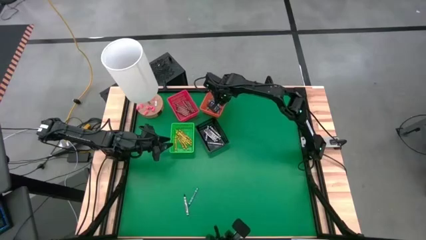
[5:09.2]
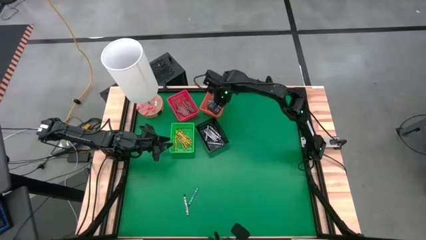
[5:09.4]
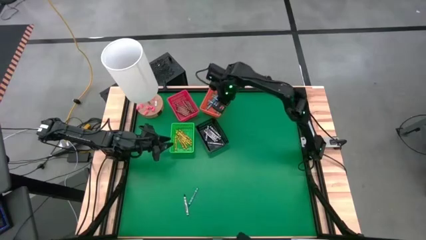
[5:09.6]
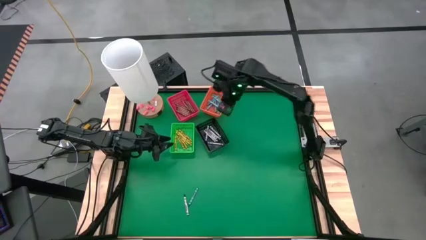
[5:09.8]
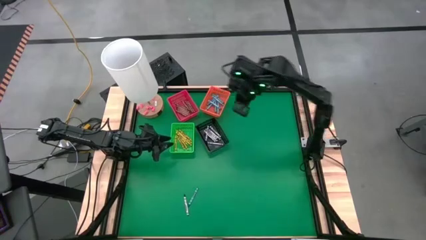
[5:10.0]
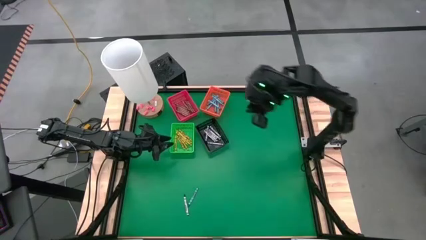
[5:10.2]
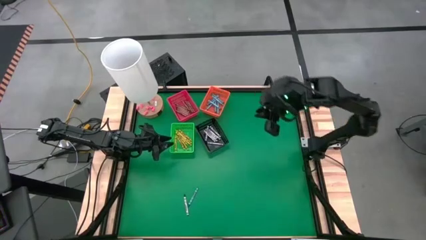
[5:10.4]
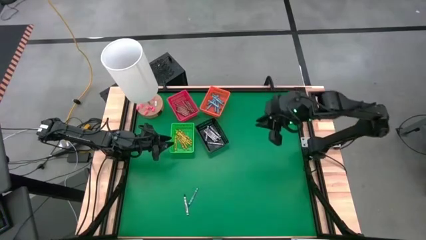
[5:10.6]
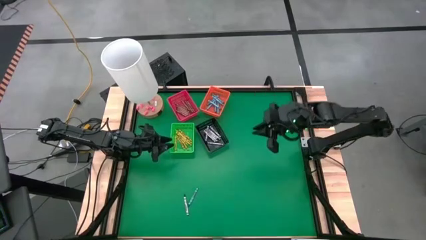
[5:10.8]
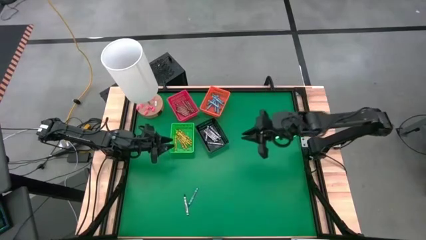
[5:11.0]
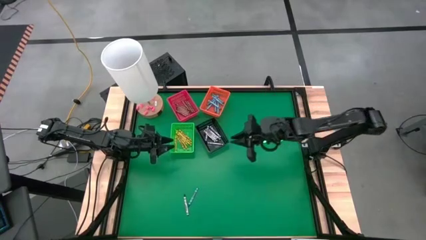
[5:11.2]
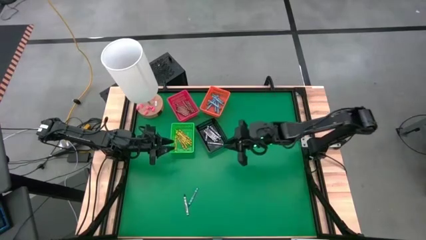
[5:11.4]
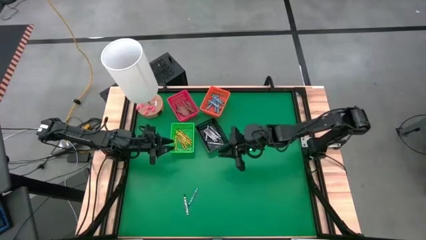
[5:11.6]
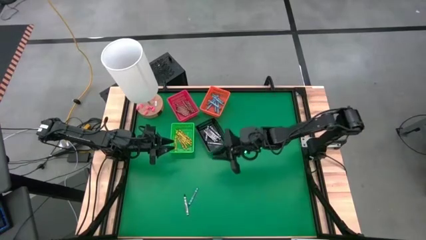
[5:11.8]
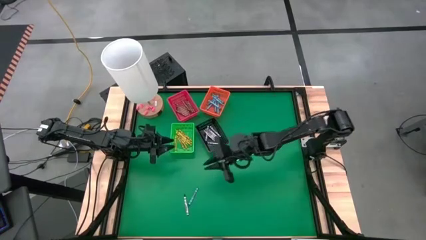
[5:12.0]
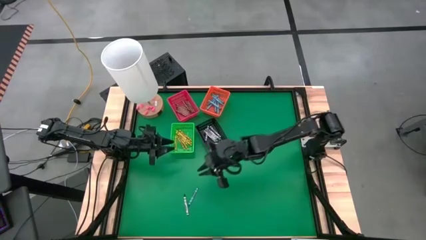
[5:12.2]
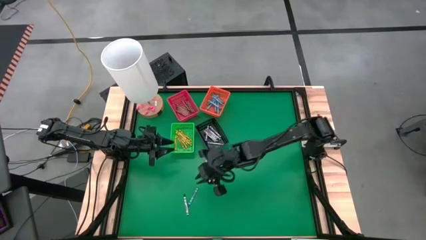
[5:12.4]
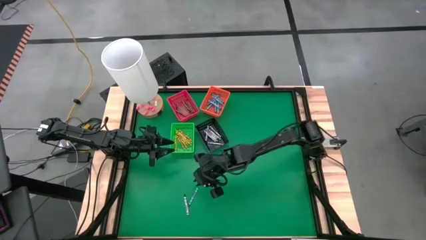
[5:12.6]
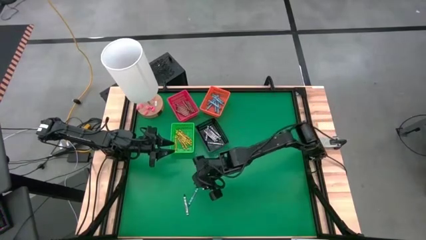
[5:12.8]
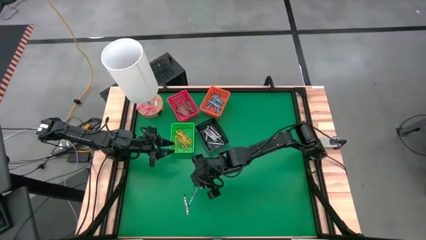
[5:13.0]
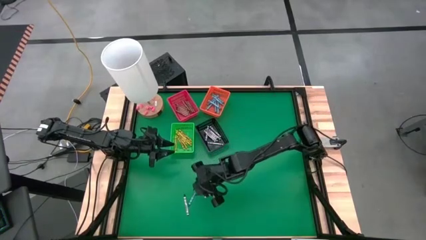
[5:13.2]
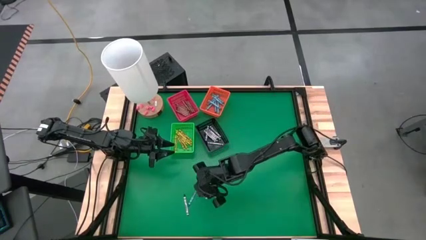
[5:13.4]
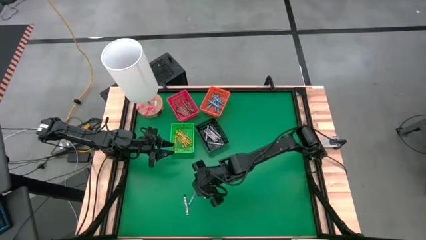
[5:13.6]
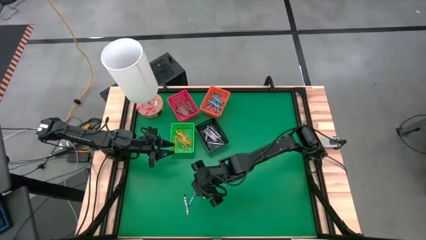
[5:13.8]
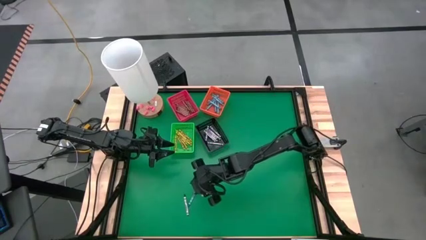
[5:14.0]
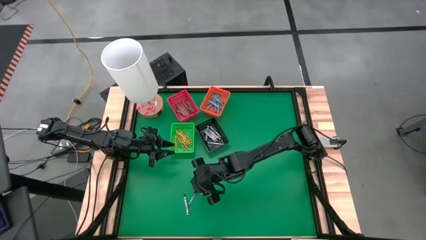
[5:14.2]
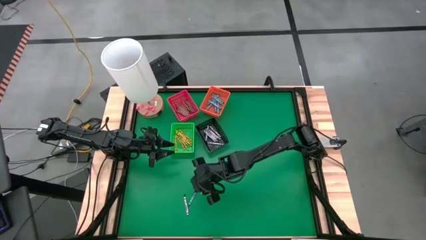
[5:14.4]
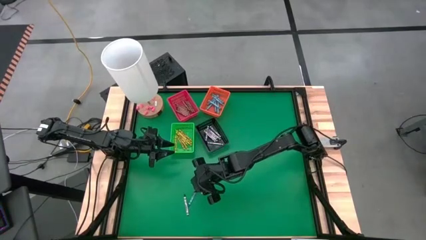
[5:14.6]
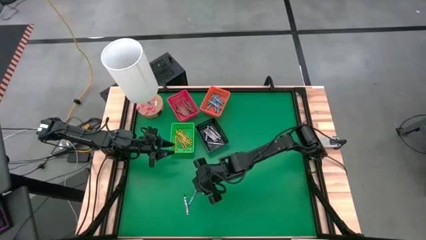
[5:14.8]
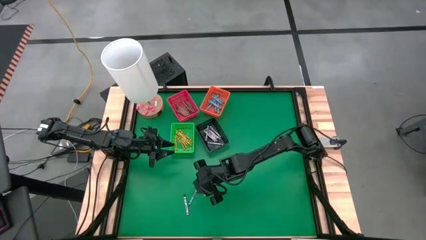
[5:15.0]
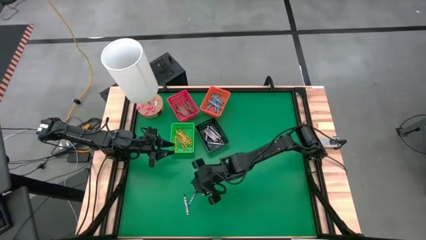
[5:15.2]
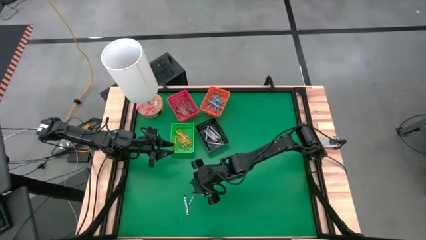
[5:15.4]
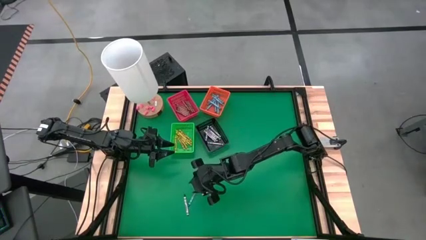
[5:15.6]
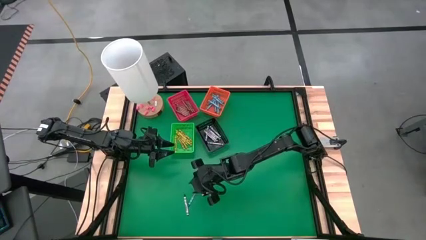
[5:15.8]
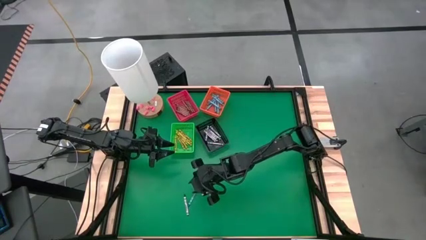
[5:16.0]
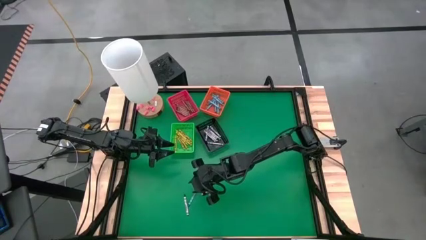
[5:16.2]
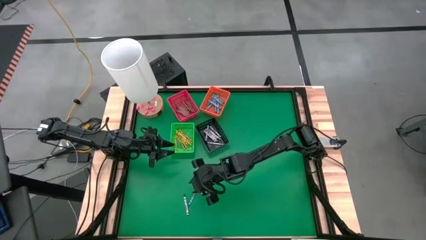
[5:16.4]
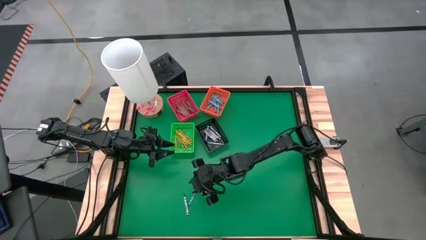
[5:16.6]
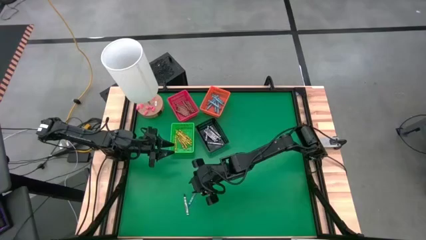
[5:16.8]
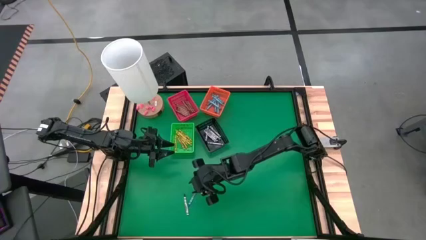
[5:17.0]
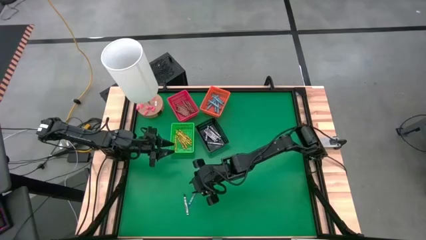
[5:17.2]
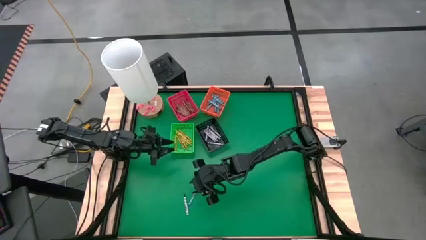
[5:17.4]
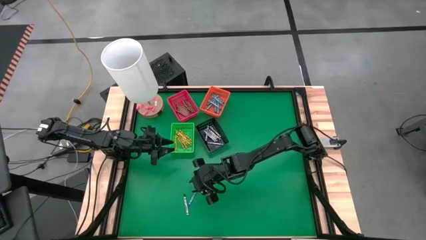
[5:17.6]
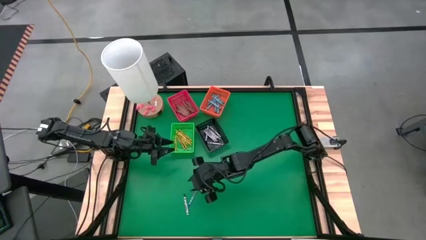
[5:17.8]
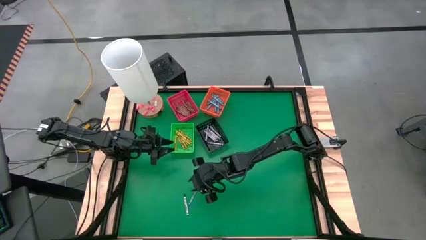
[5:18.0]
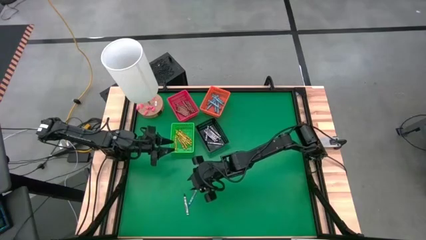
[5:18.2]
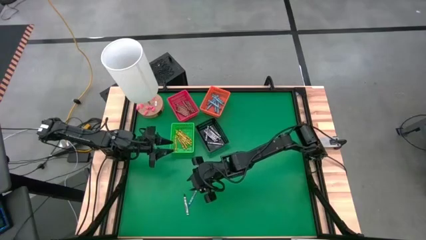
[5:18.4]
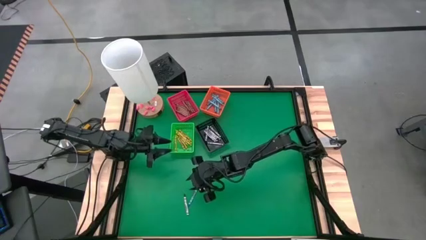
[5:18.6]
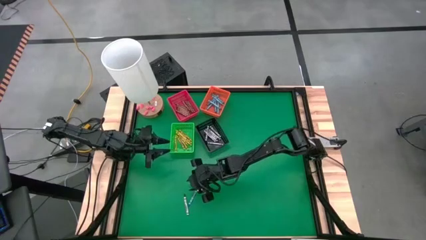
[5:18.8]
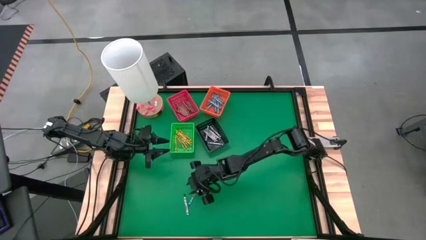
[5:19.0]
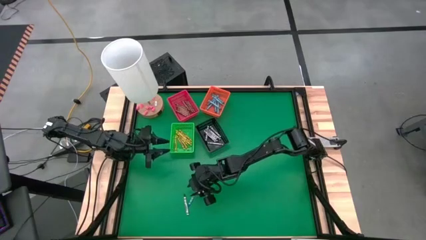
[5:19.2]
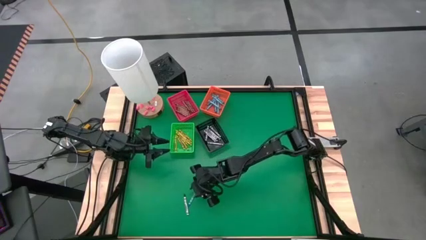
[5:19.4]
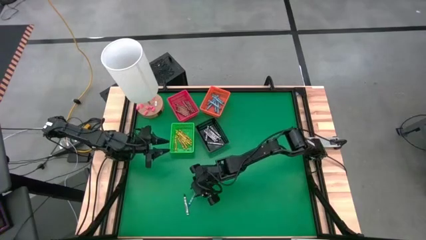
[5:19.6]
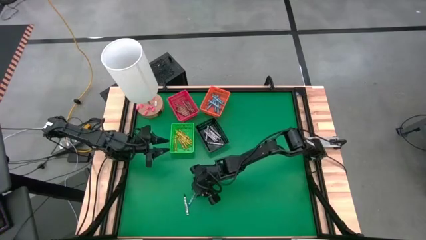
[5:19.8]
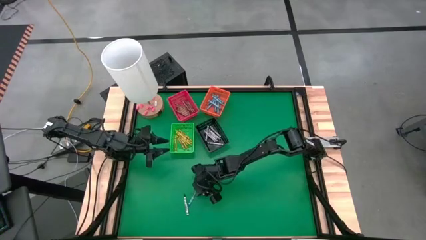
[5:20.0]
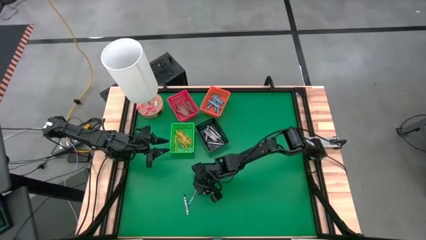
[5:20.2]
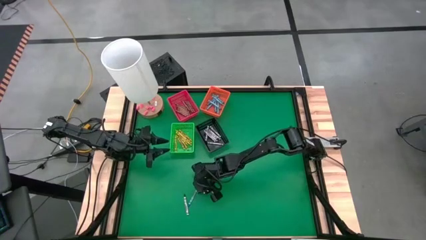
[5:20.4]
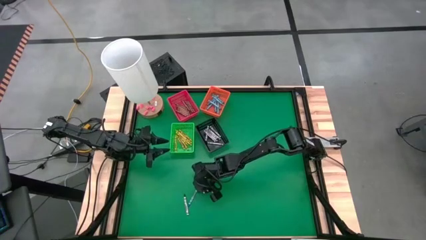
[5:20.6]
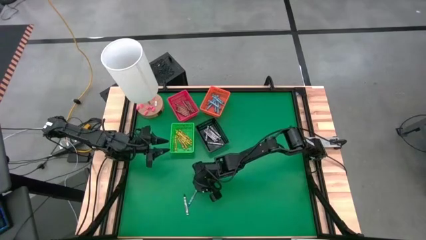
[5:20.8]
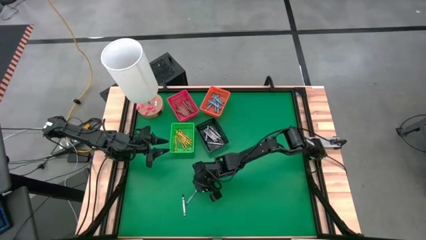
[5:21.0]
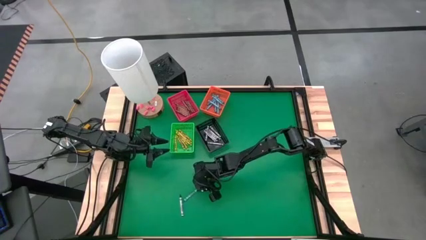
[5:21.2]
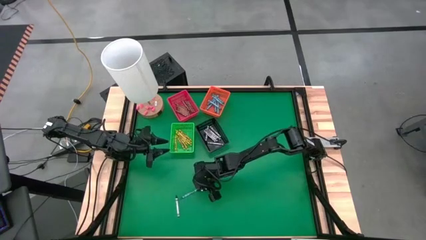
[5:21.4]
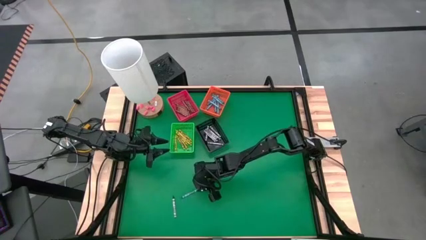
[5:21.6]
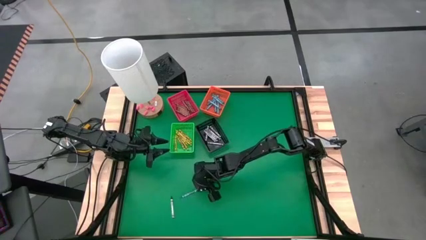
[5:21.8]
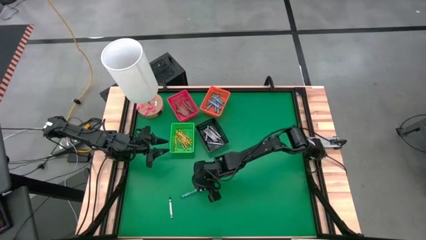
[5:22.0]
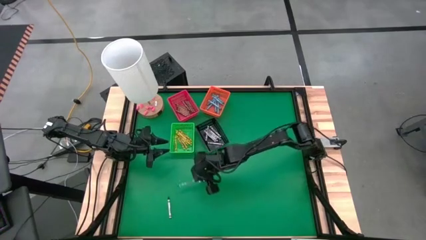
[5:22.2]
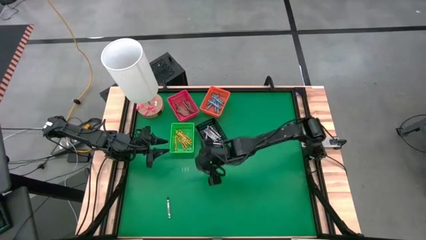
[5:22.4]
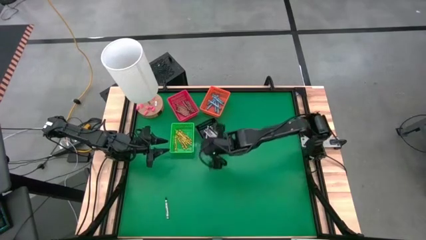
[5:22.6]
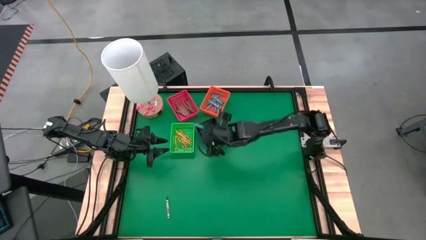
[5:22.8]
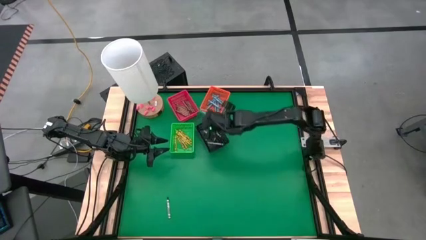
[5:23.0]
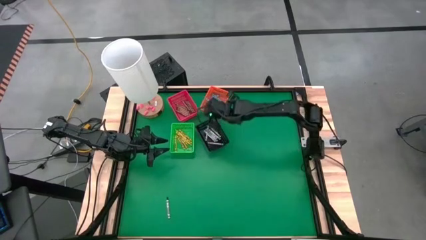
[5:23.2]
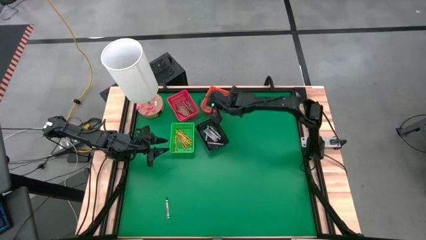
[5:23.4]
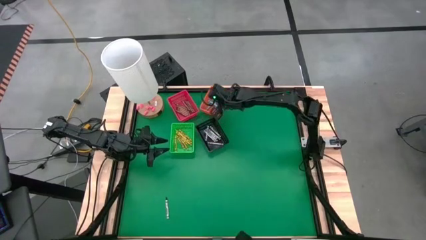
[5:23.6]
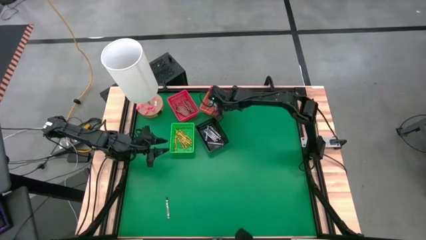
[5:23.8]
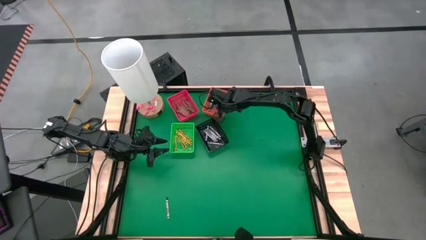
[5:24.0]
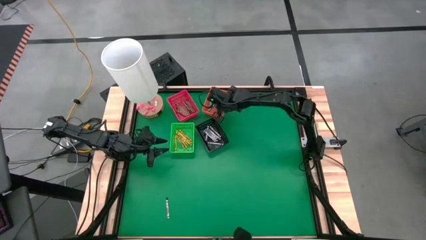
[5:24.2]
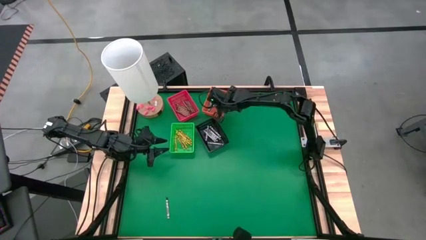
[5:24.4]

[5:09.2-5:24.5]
Task: Sort crayons
Put the blue crayon into the orange bin
